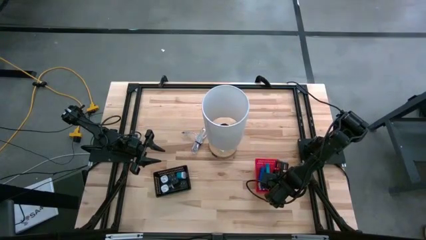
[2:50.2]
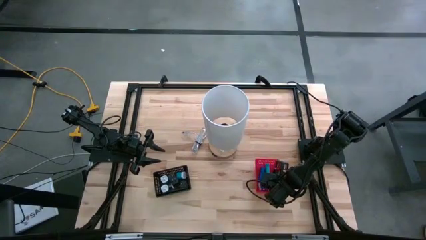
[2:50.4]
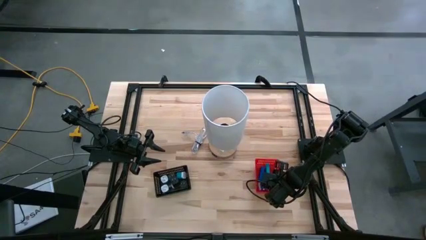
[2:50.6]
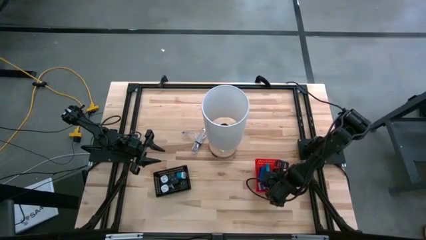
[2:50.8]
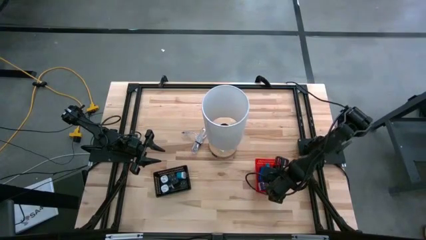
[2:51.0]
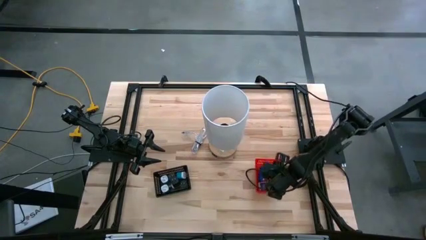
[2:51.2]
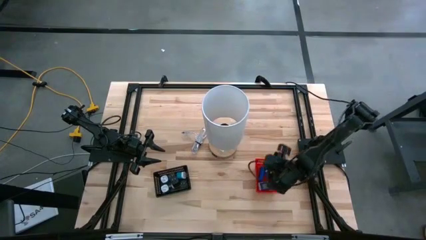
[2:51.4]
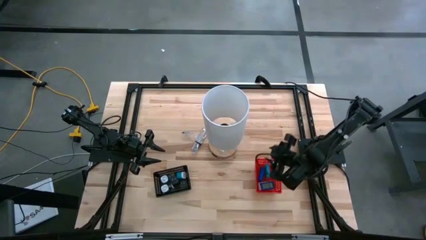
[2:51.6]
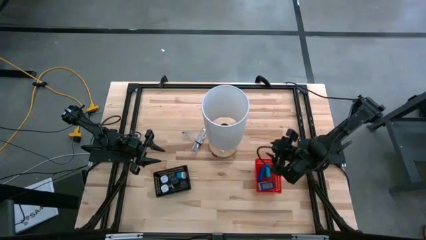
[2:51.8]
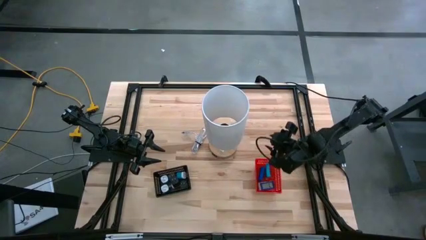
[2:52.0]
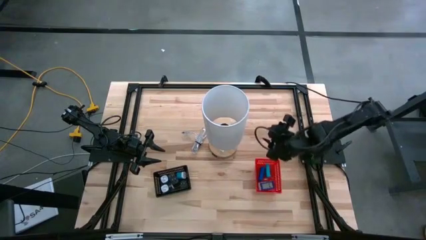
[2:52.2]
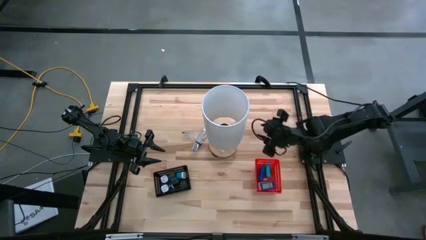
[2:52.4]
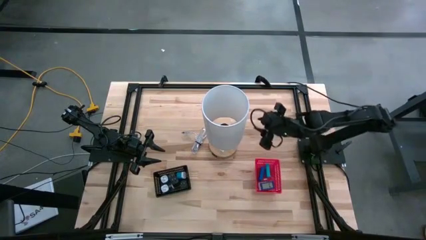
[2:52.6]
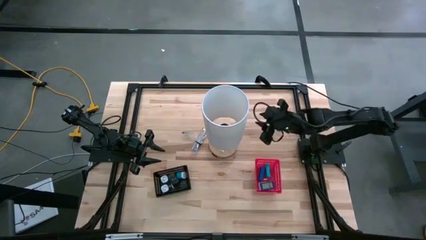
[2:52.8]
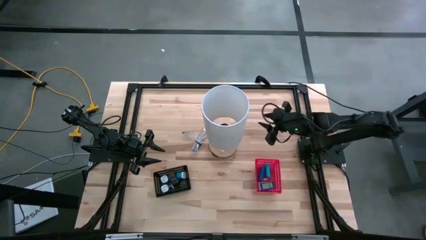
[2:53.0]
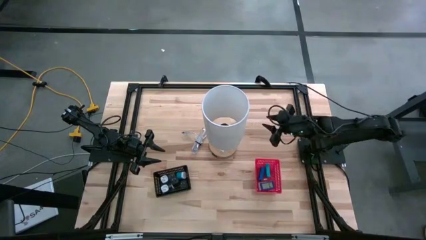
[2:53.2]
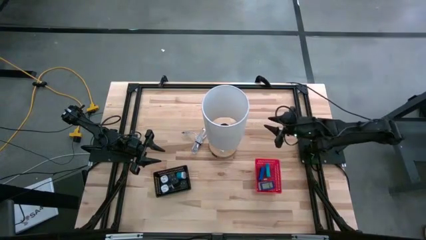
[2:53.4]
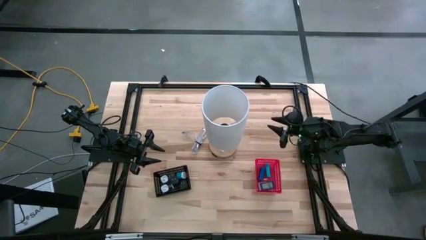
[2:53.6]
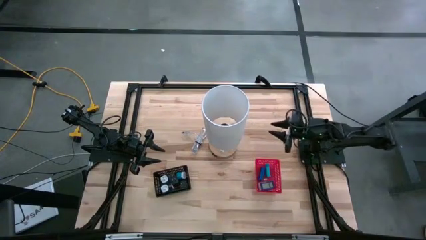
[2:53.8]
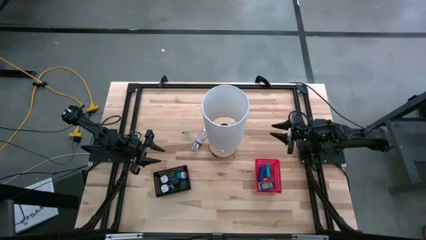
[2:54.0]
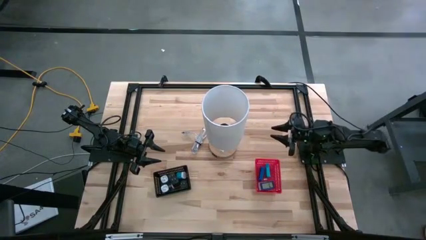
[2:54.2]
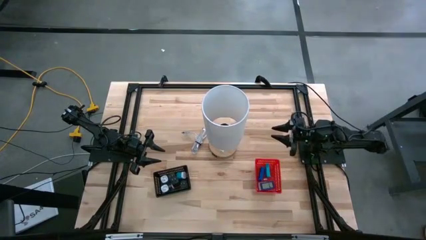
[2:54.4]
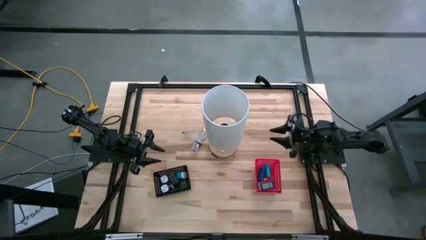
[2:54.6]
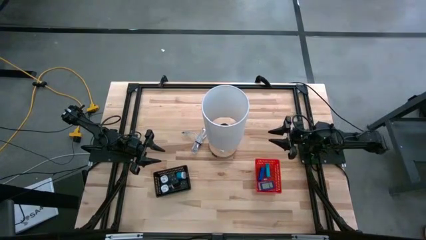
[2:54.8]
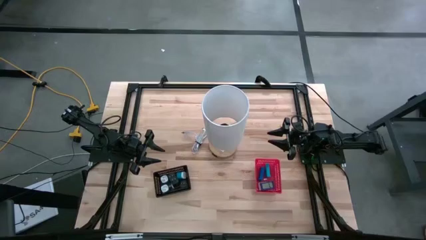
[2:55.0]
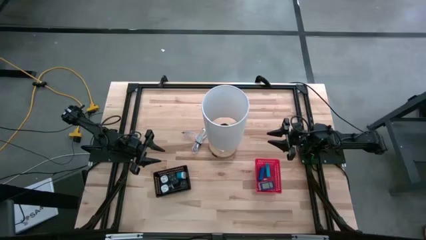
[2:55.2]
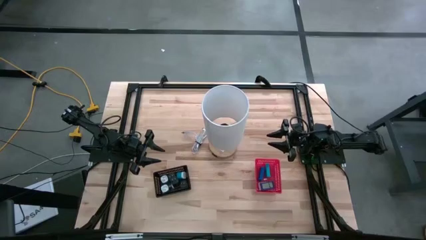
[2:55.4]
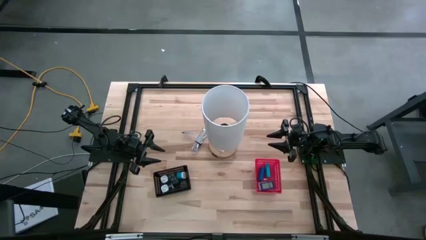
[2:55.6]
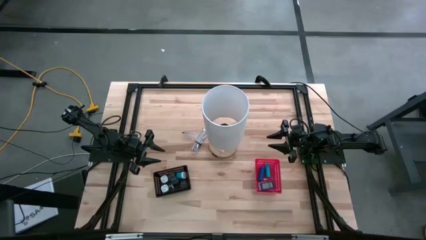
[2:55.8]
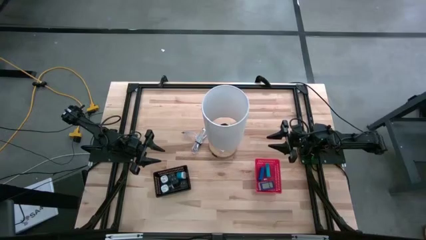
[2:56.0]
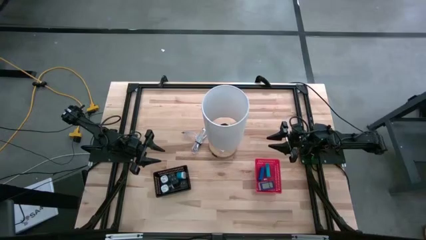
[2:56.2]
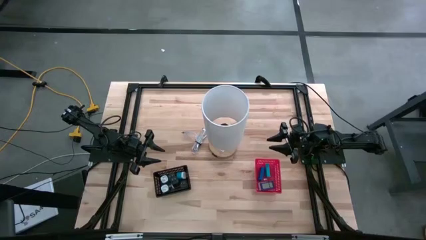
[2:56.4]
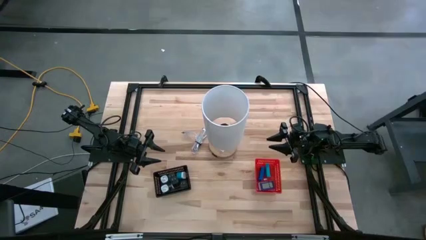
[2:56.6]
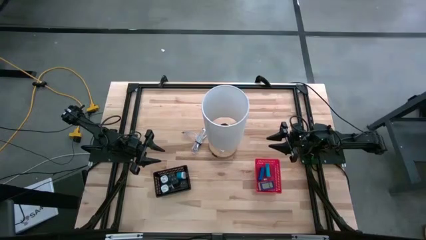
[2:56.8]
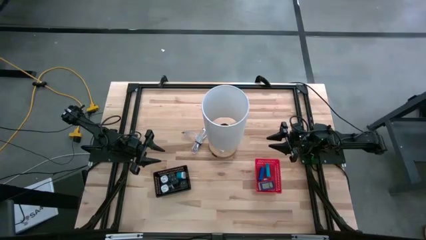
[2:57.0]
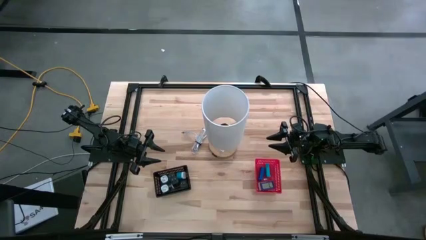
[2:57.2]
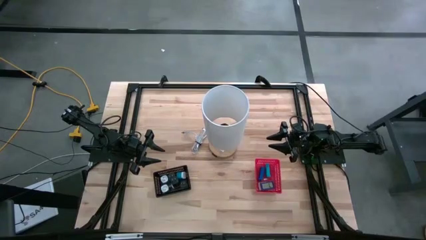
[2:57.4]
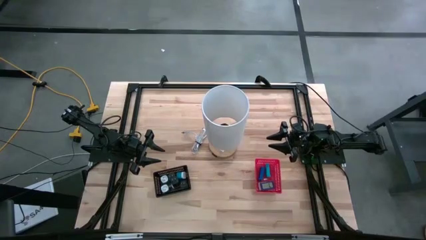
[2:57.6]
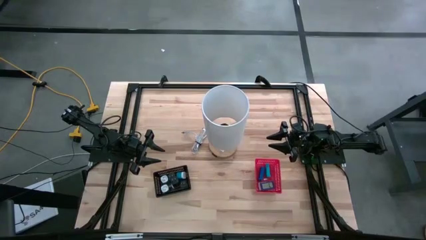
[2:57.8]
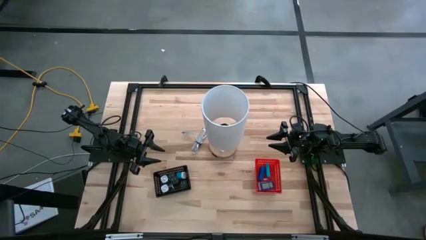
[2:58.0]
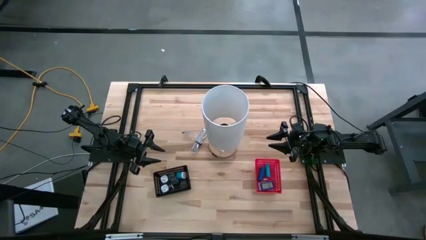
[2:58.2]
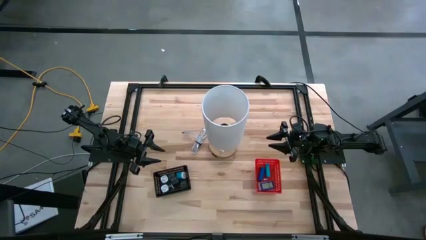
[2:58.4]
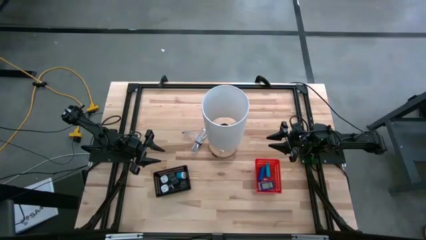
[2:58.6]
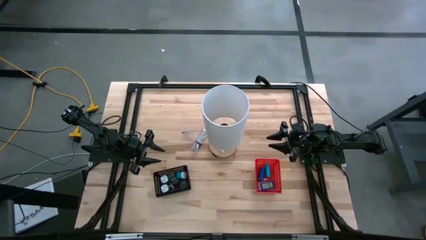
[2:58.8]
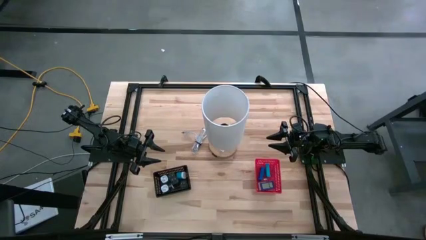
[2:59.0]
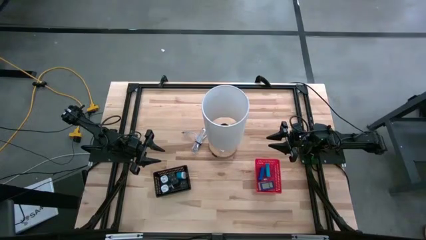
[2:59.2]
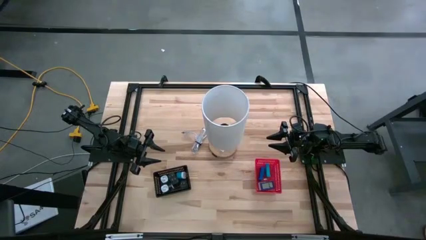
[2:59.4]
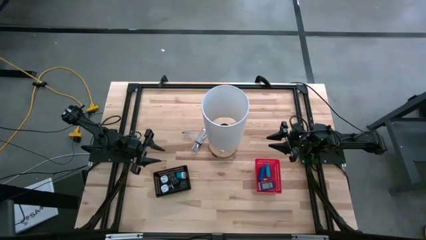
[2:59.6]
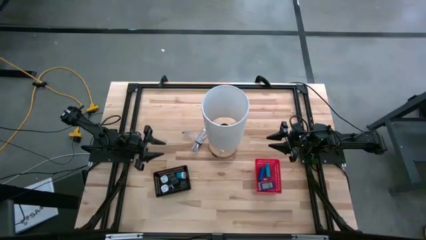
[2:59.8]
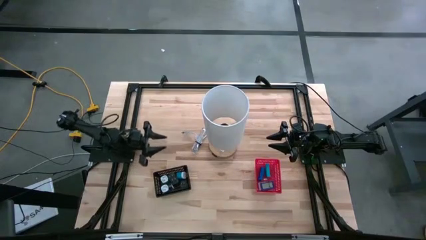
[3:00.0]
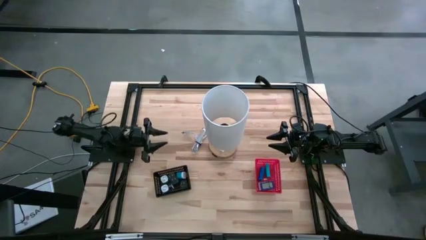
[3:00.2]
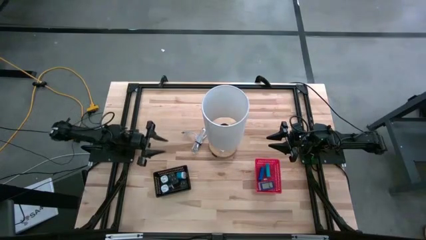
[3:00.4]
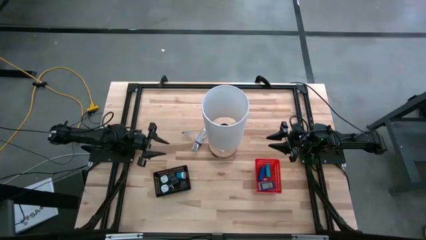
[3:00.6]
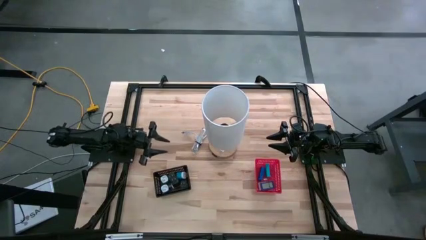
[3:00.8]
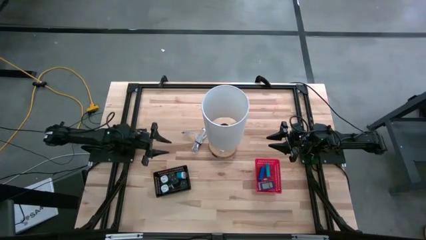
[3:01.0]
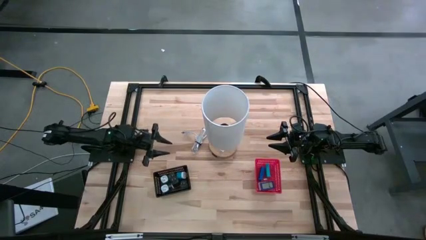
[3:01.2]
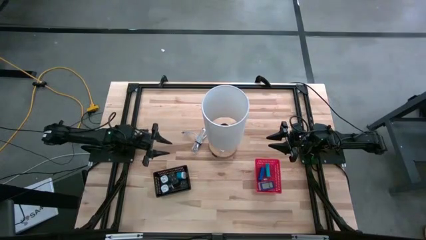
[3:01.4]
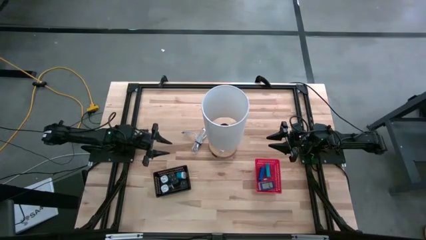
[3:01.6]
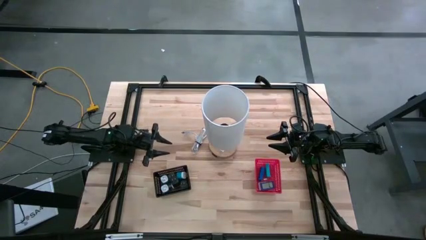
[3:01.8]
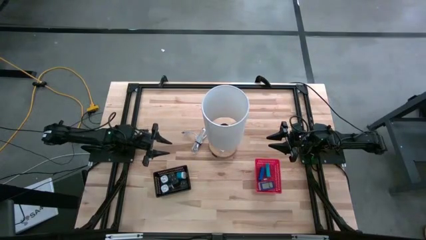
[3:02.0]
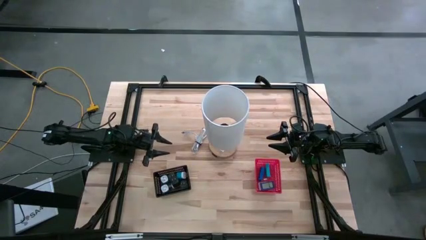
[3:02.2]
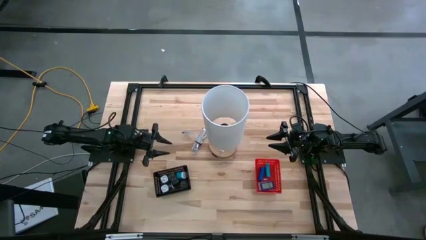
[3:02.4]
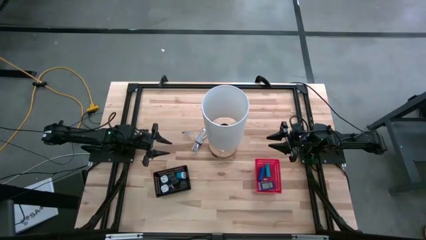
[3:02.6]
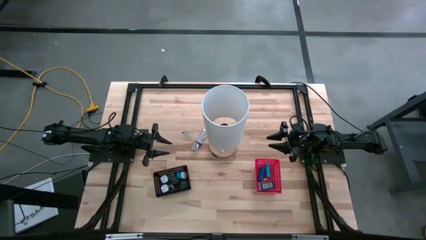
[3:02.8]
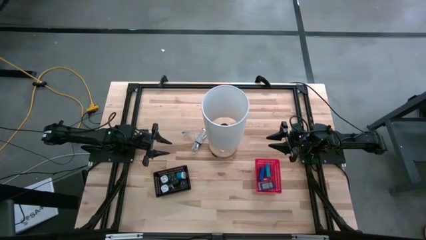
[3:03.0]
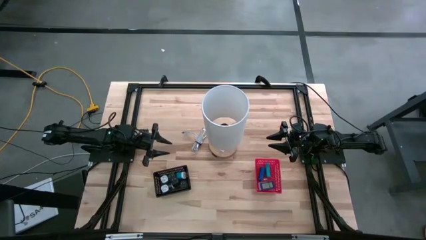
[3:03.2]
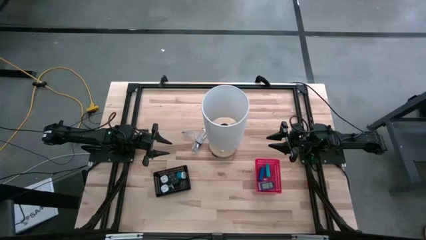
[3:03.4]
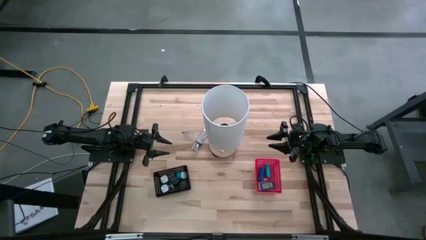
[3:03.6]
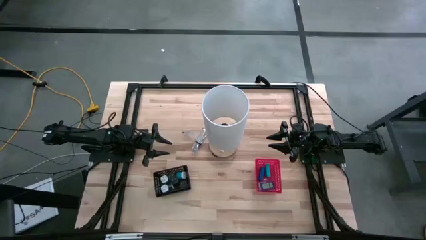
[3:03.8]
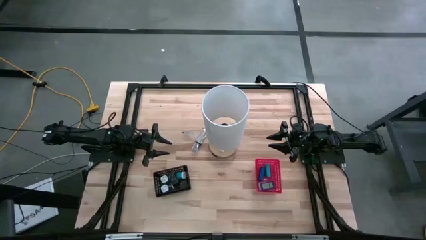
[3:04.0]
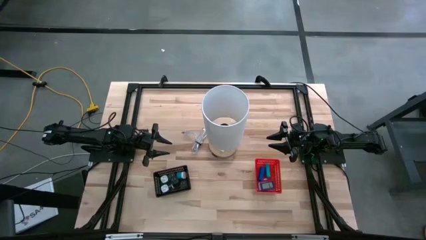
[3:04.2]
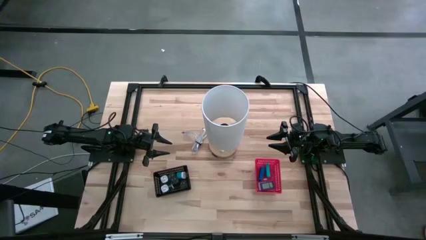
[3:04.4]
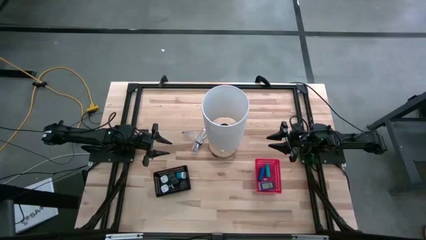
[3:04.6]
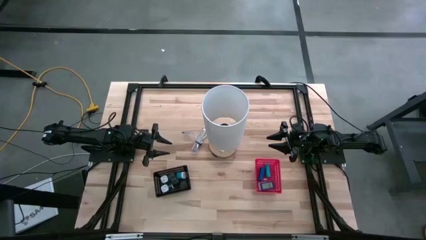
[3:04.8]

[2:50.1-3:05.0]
Task: Pick & Place Office items
Return to Home Position
